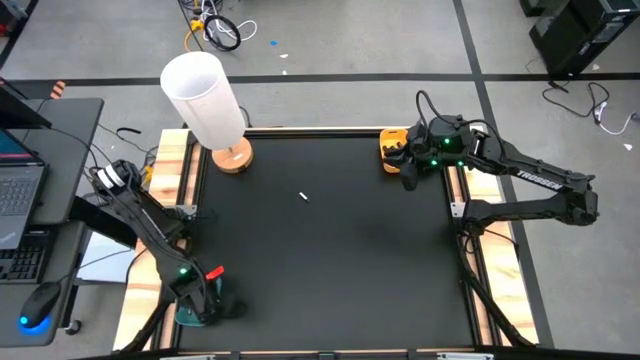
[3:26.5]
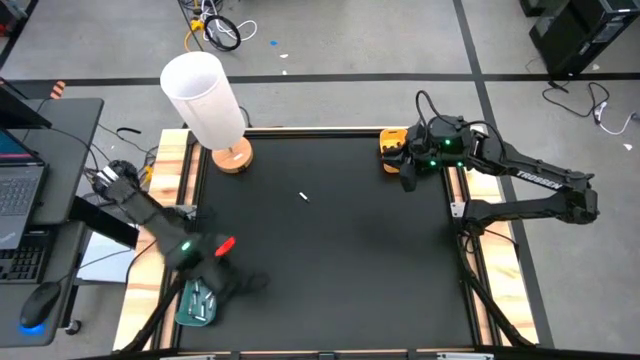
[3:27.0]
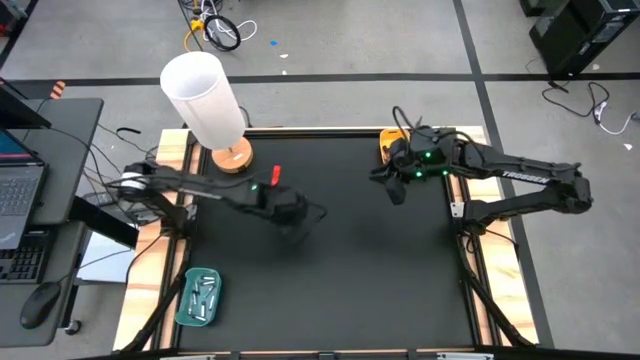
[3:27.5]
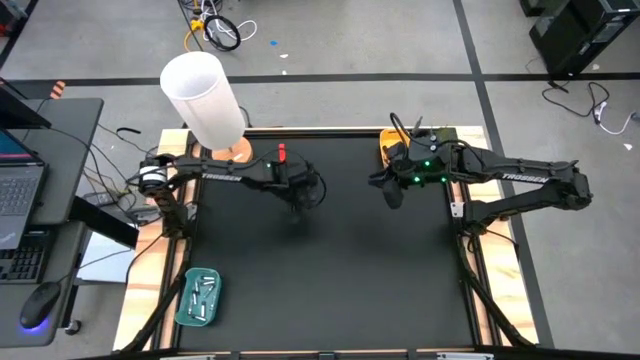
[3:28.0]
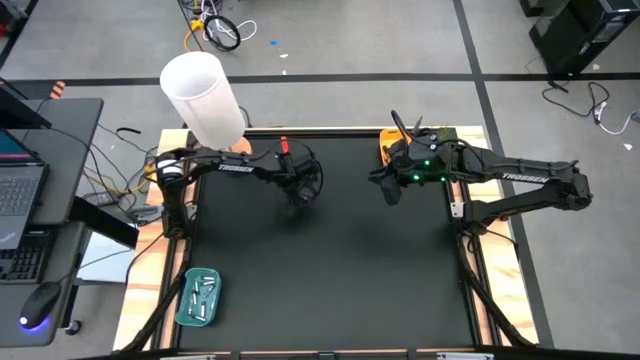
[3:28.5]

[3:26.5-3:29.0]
Task: Sort batteries
Put the silver battery into the blue bin

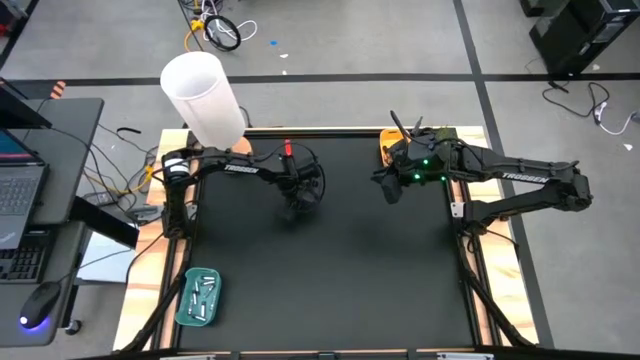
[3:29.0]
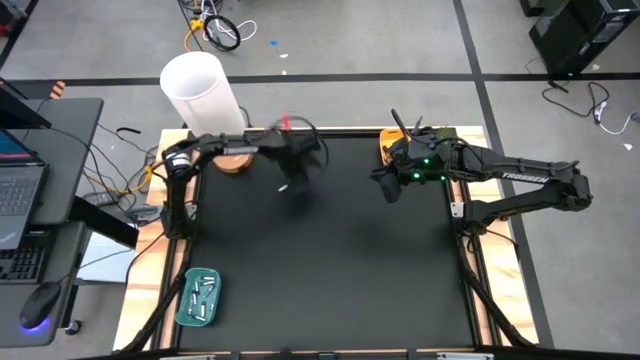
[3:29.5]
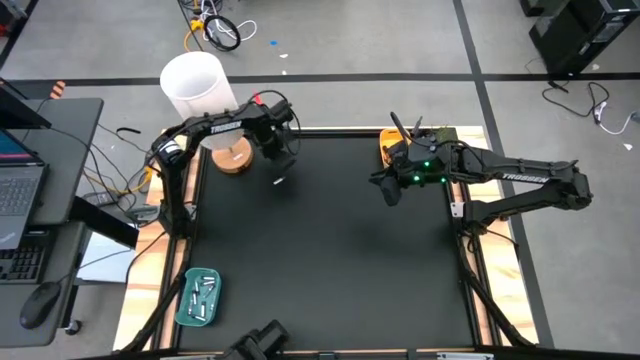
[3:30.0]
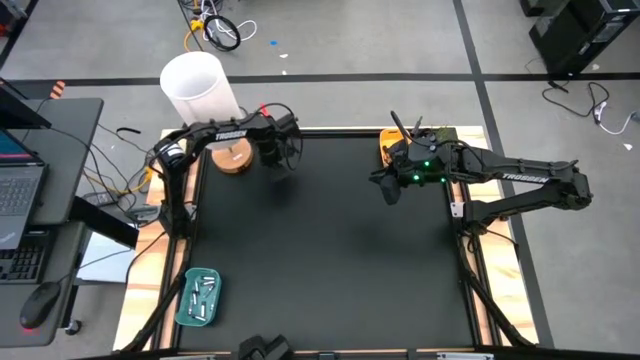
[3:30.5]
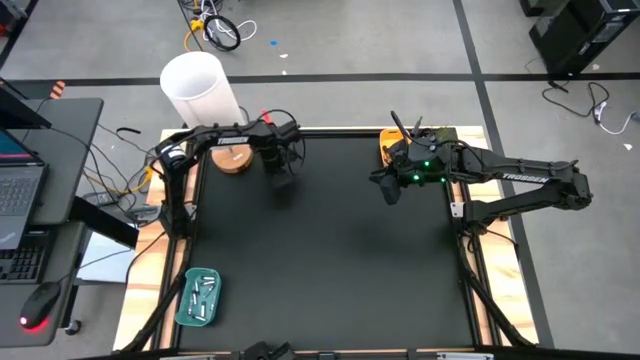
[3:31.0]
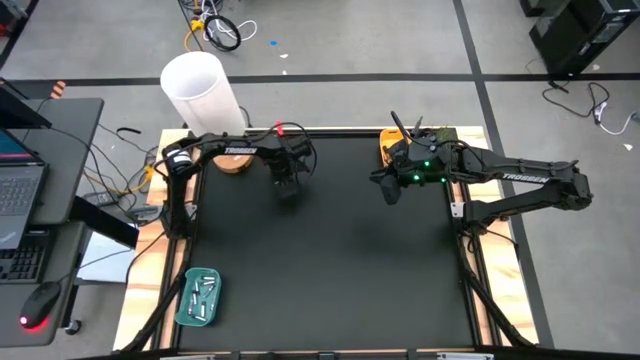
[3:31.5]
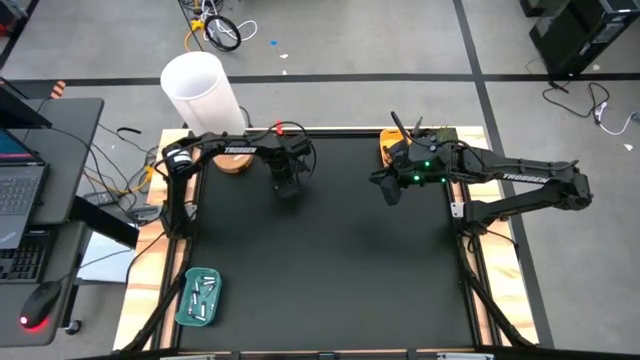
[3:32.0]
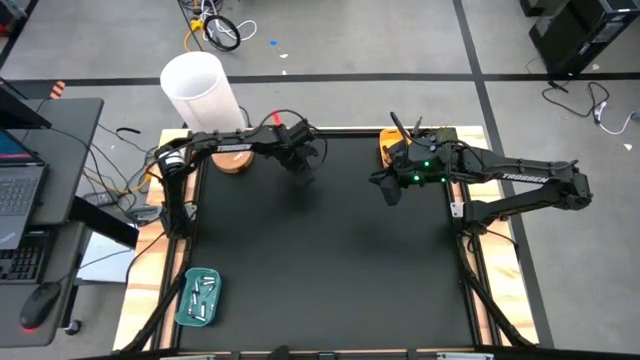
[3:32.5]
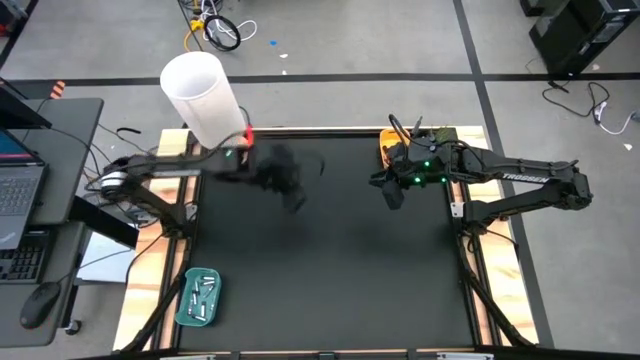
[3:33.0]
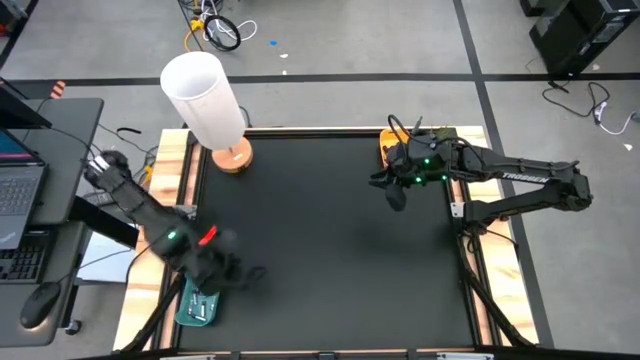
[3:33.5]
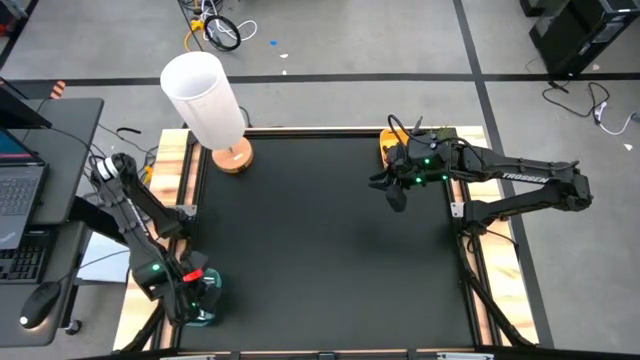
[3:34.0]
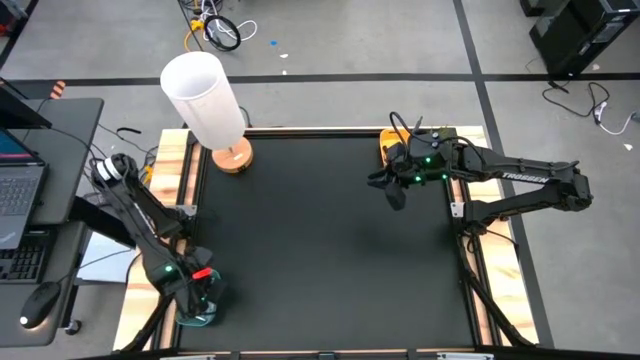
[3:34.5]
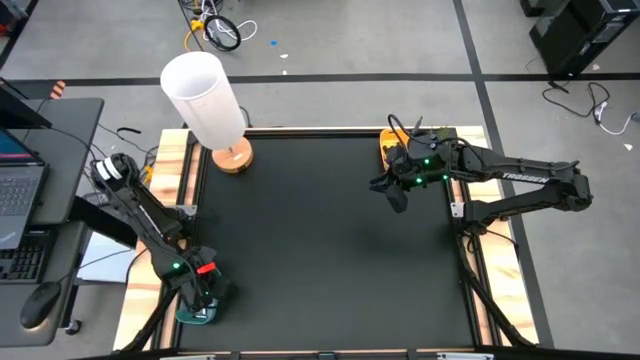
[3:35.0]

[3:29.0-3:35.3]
Put the silver battery into the blue bin

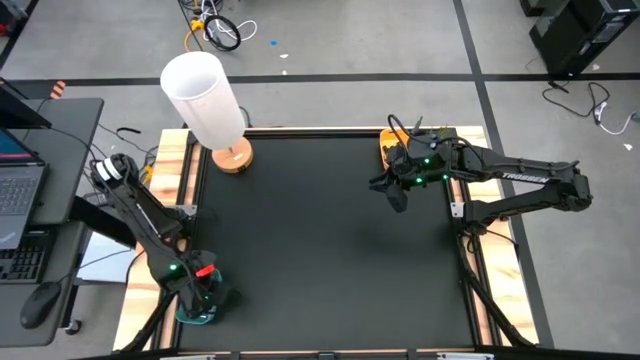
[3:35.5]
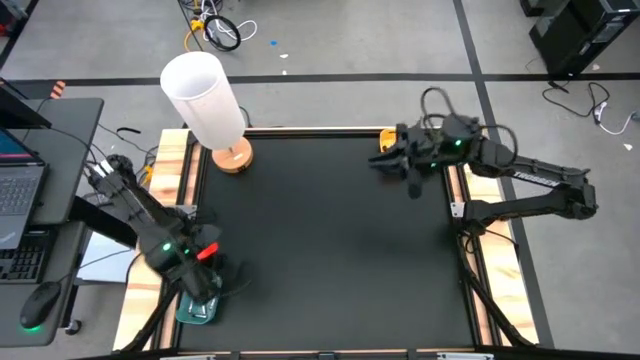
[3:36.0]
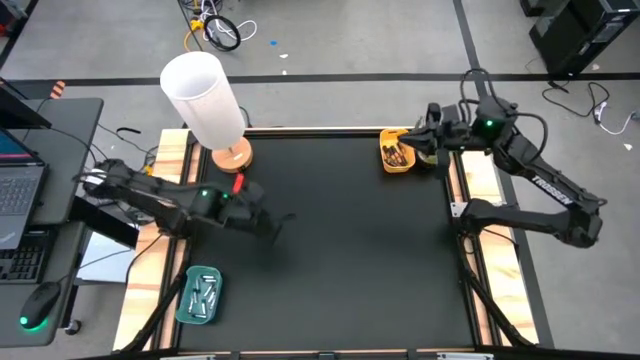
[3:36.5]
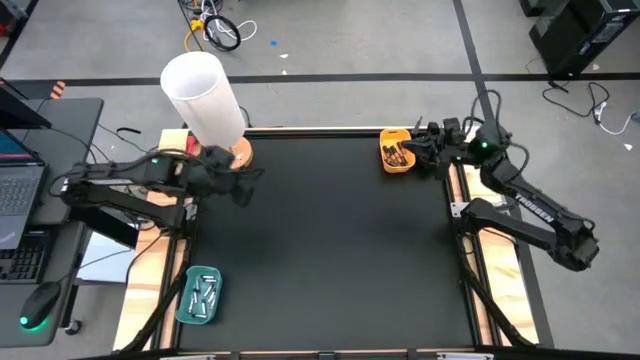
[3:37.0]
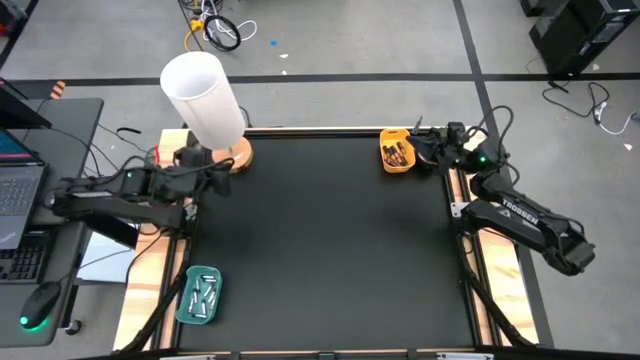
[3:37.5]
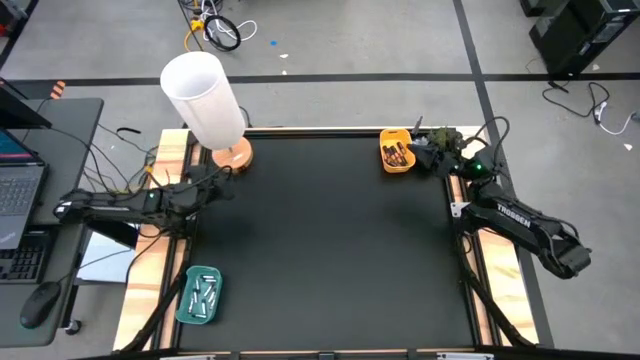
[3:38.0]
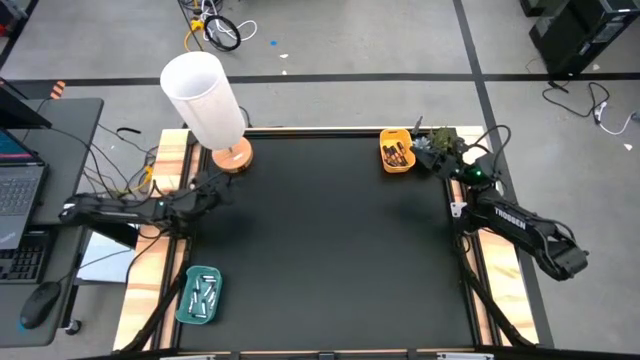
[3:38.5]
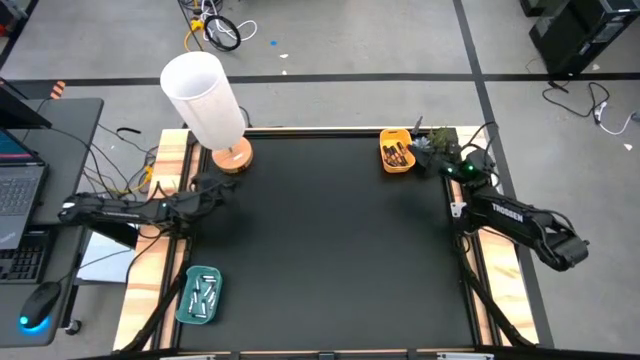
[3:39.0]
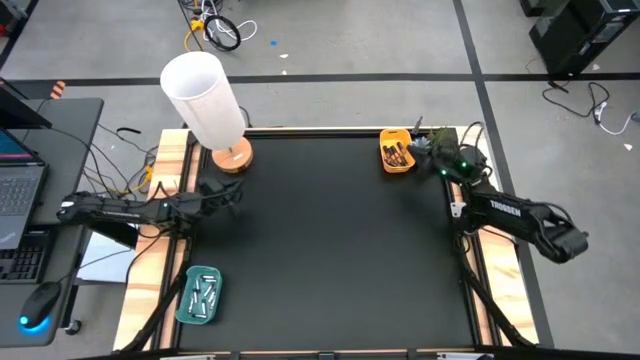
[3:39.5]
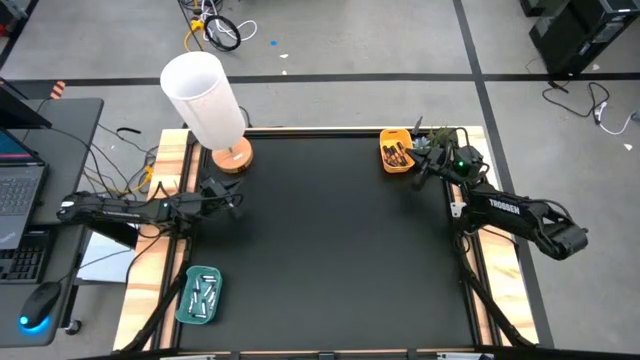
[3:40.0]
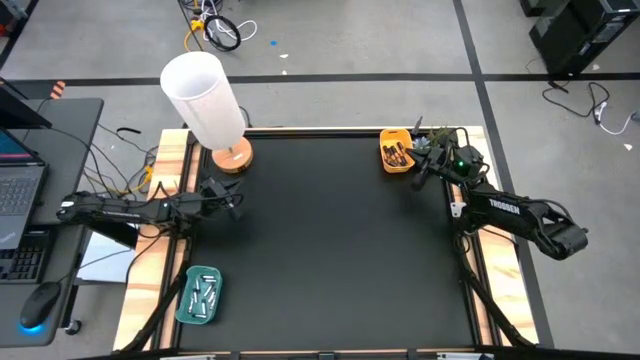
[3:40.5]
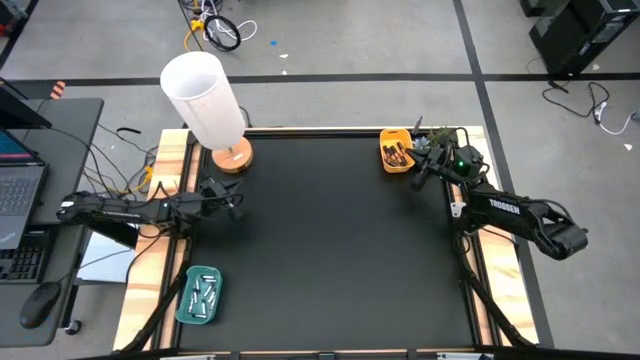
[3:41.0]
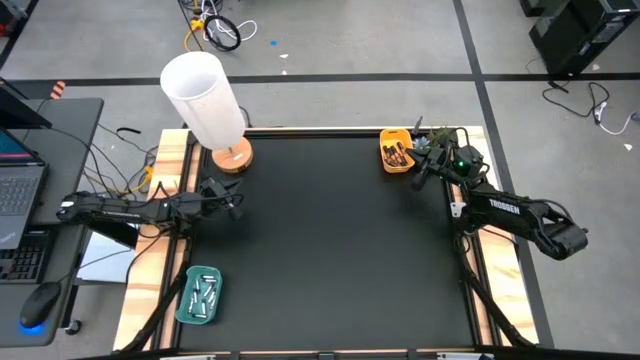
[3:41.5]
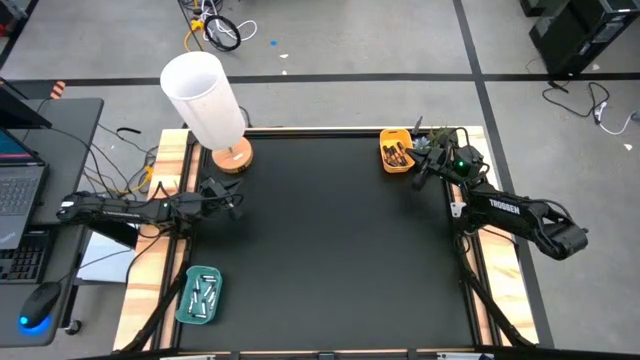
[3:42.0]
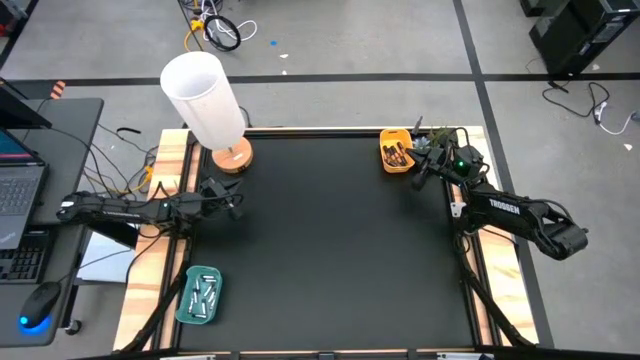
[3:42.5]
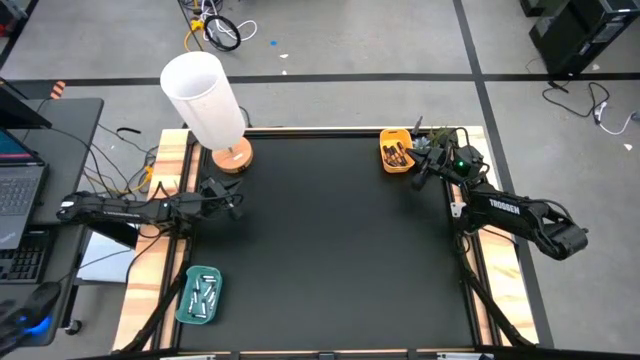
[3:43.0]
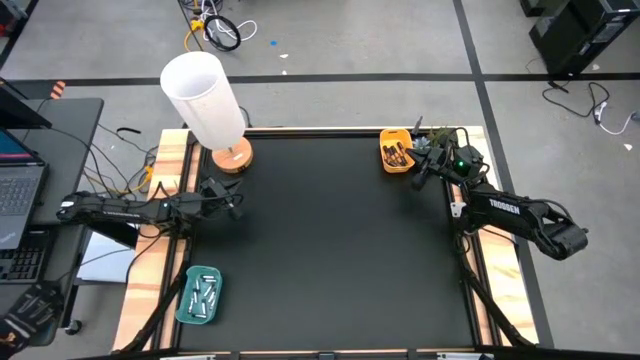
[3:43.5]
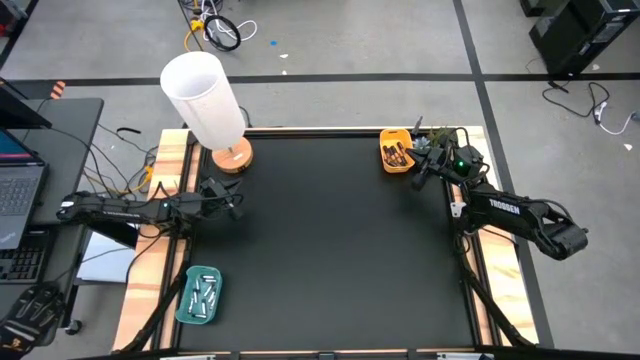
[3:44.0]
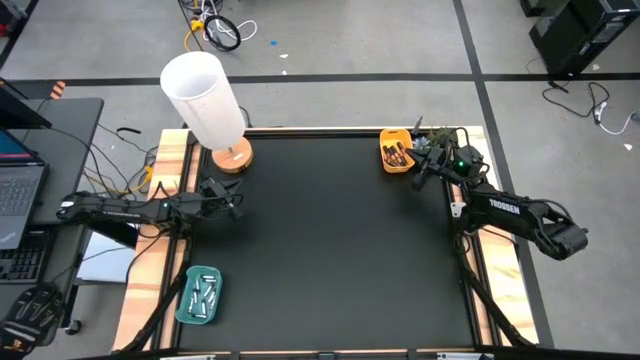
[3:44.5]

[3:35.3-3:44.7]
Return to Home Position

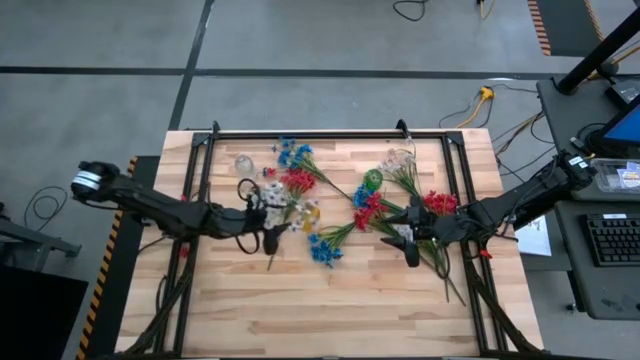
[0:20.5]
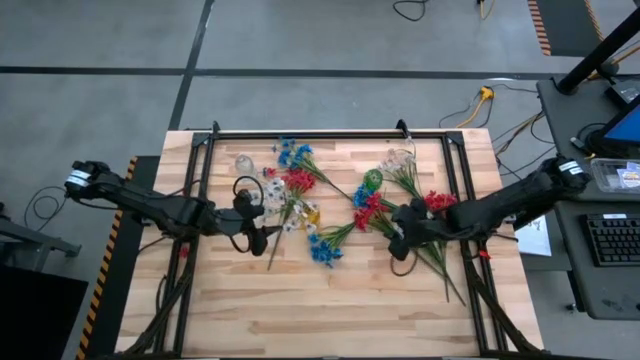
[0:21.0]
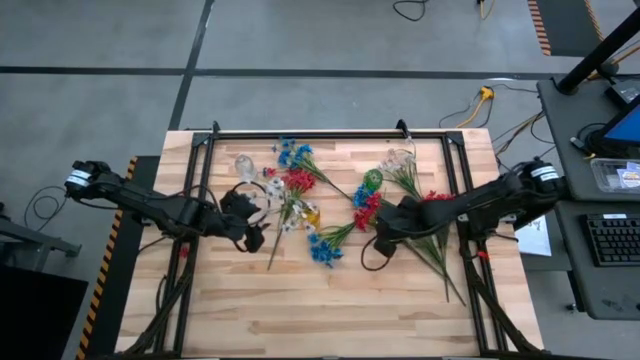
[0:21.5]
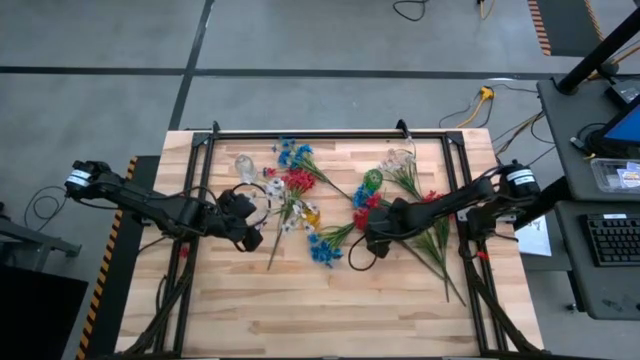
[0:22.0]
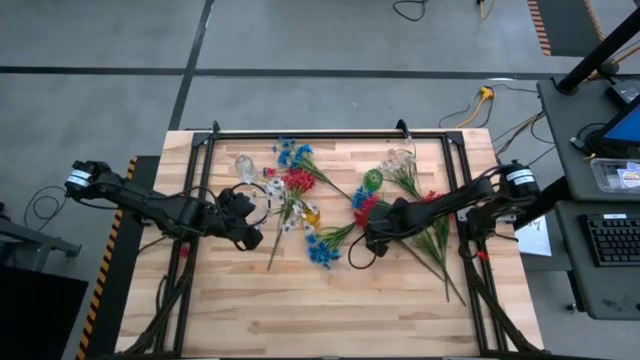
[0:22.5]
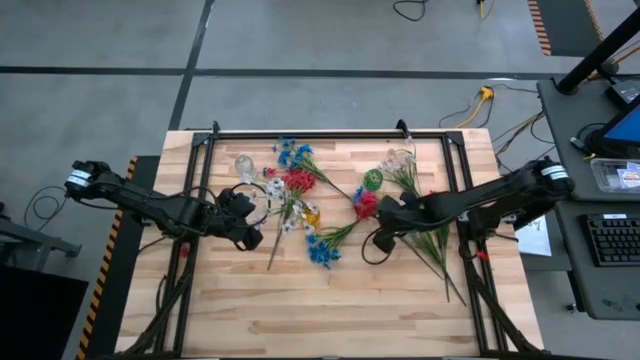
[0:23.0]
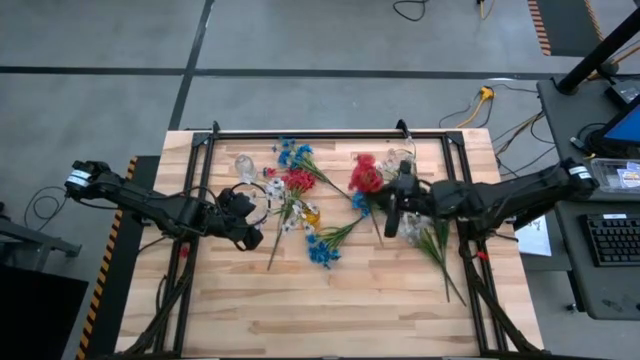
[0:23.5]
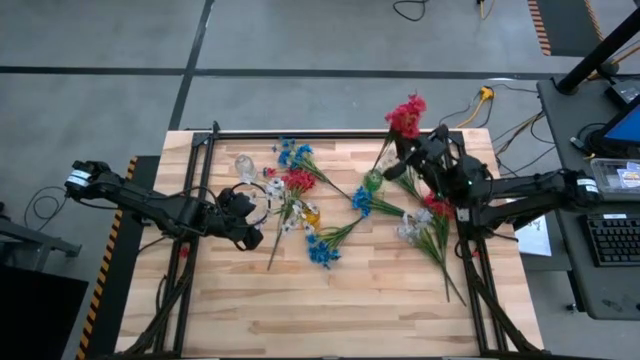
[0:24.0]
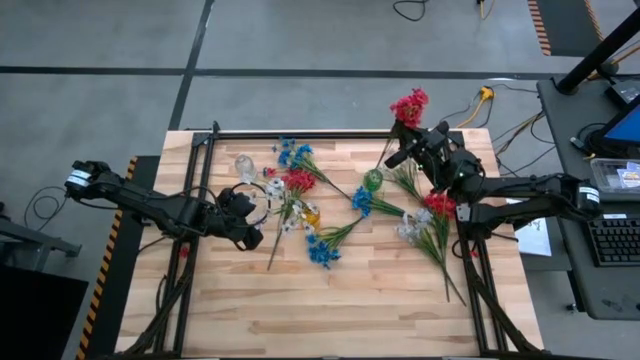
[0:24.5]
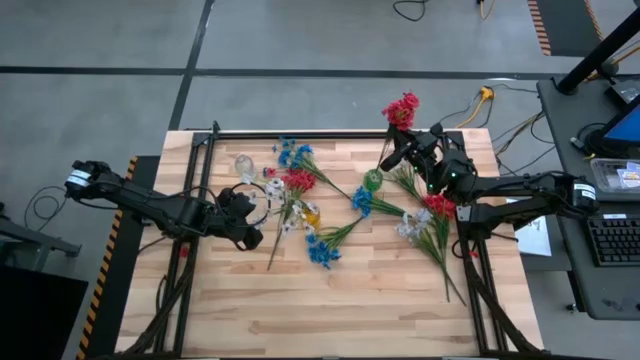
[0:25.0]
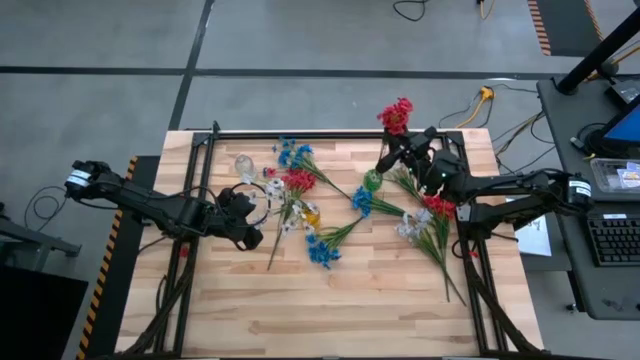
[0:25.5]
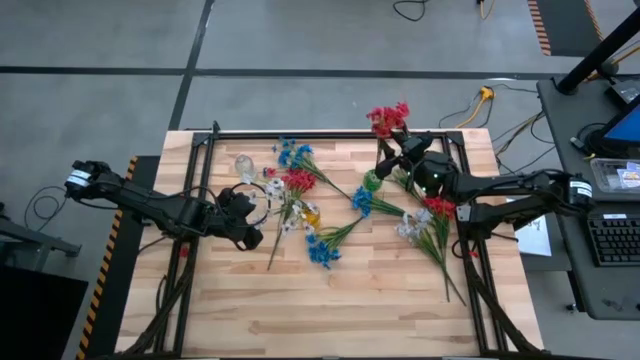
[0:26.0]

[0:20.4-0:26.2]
Task: Sort flowers into vase by color
Put the bottom red flowers into the green vase
